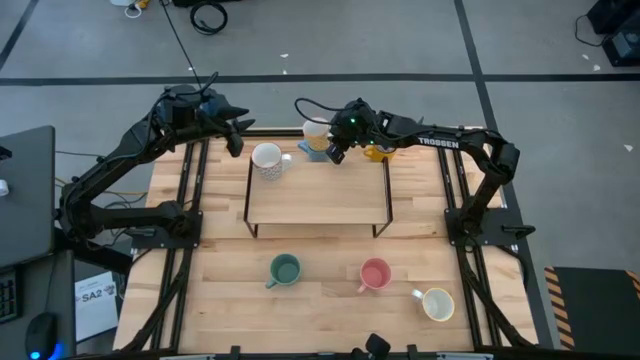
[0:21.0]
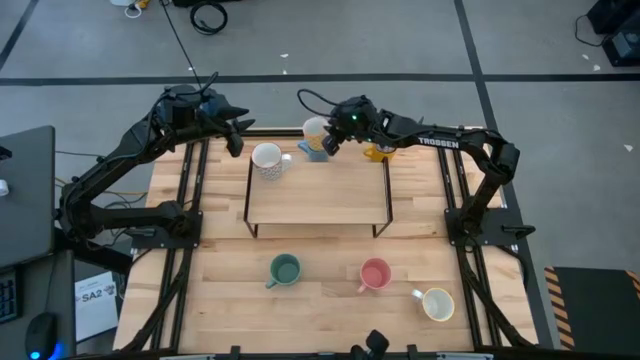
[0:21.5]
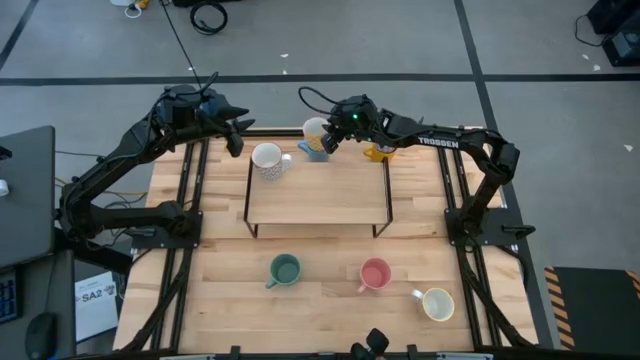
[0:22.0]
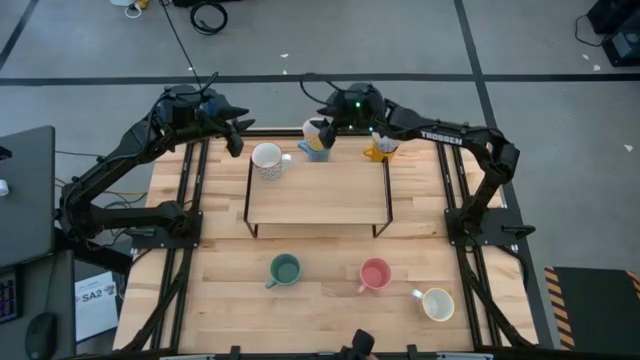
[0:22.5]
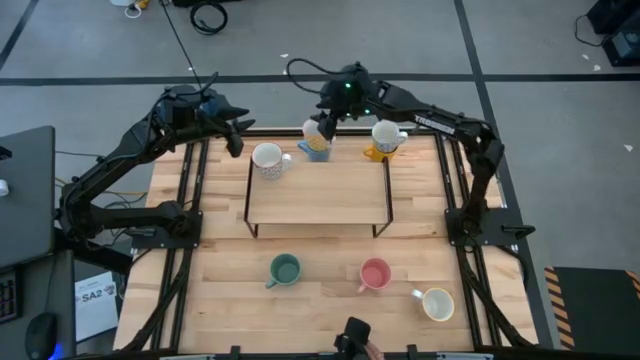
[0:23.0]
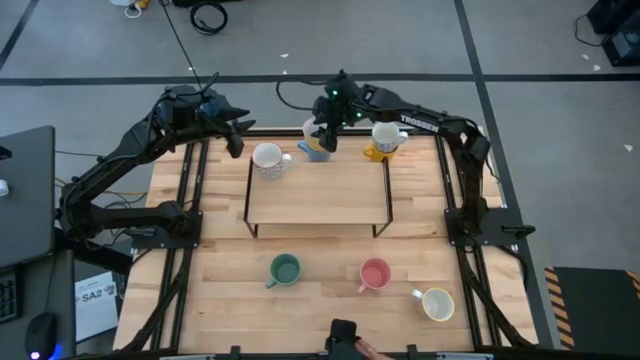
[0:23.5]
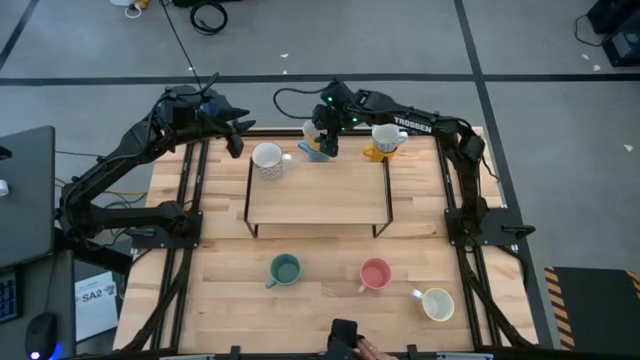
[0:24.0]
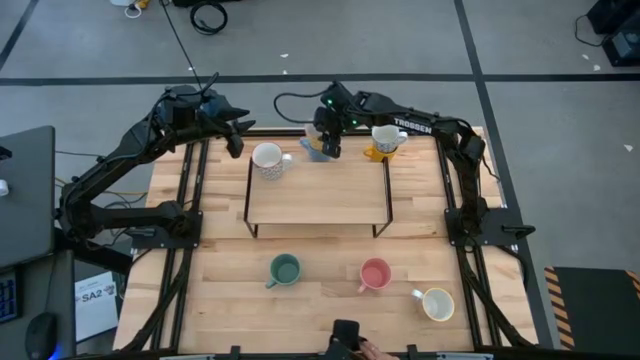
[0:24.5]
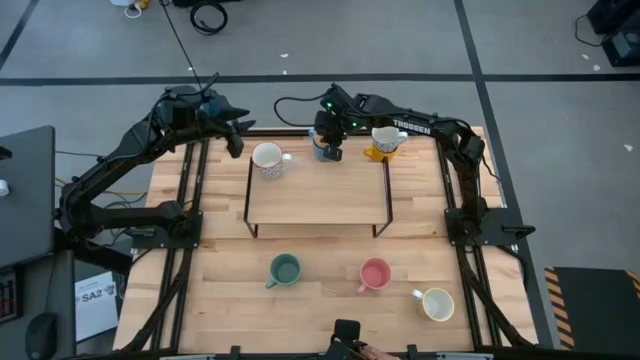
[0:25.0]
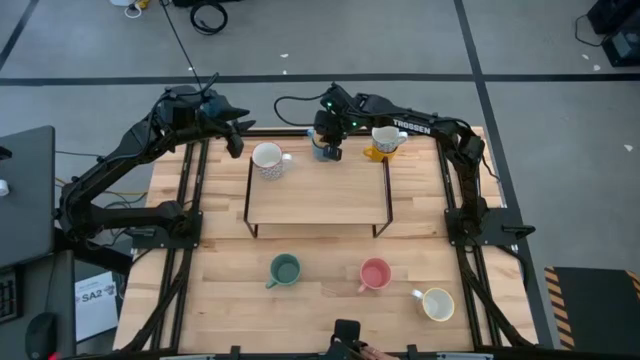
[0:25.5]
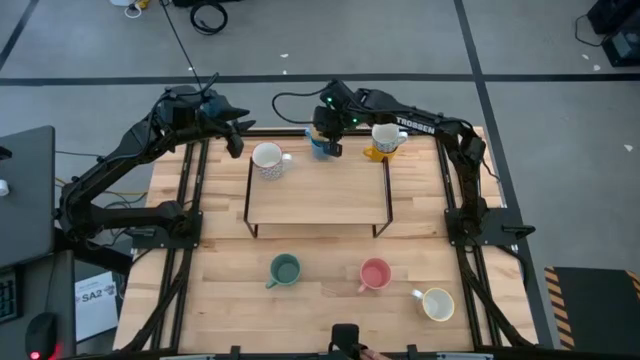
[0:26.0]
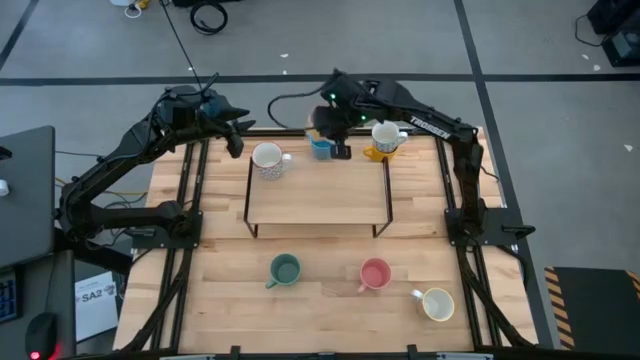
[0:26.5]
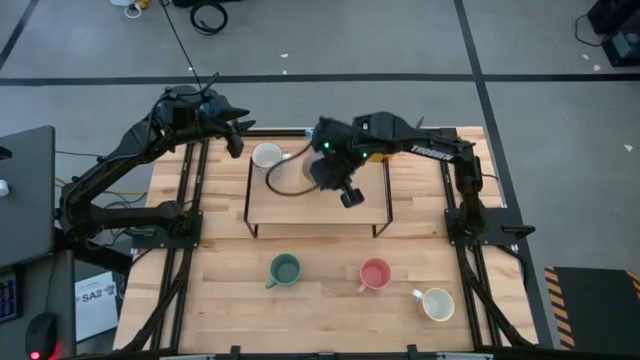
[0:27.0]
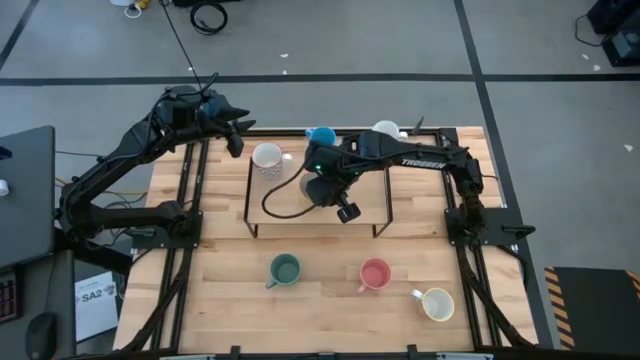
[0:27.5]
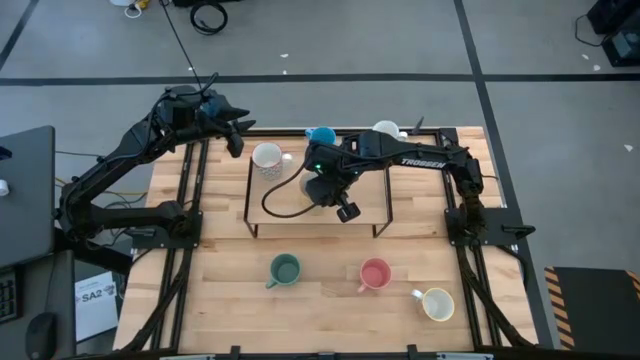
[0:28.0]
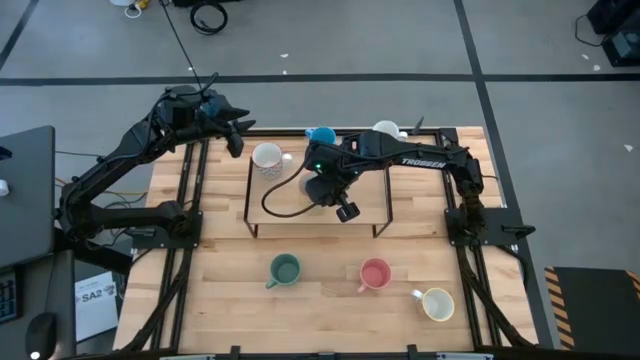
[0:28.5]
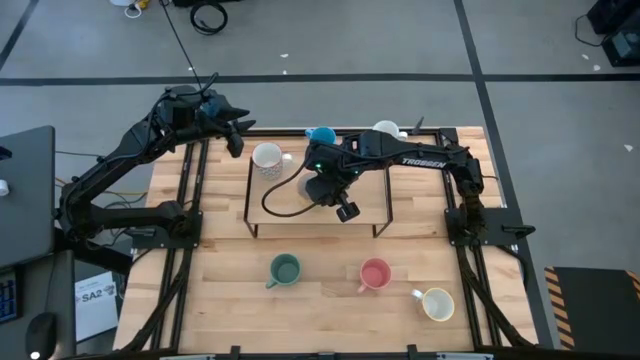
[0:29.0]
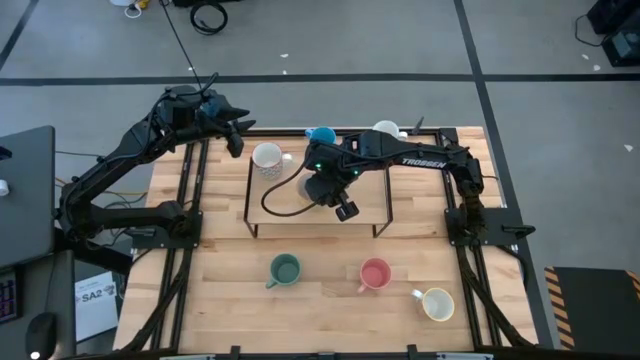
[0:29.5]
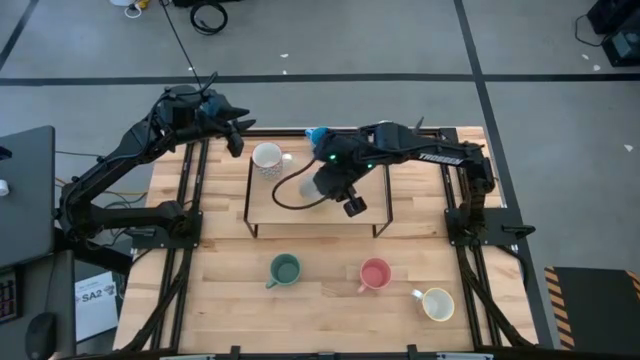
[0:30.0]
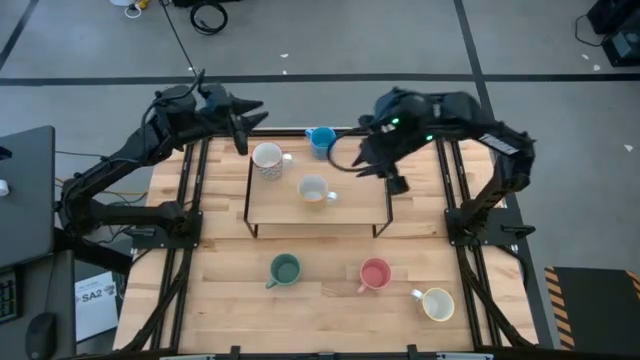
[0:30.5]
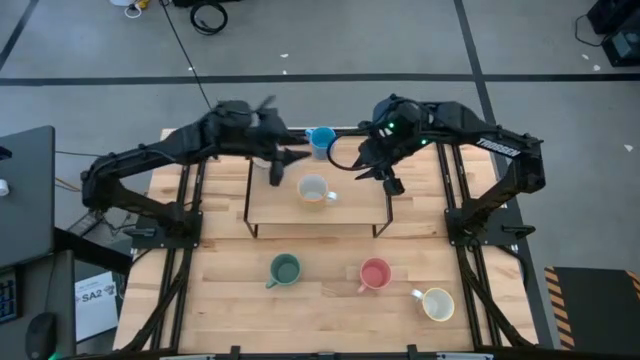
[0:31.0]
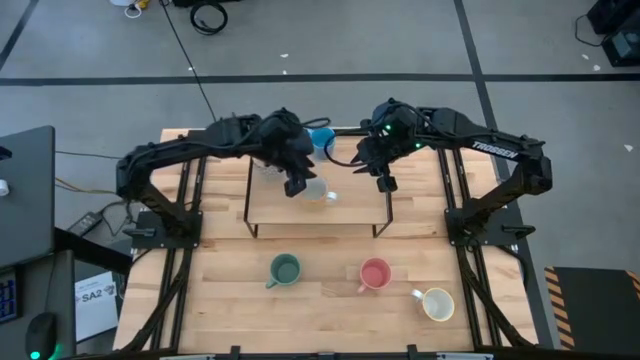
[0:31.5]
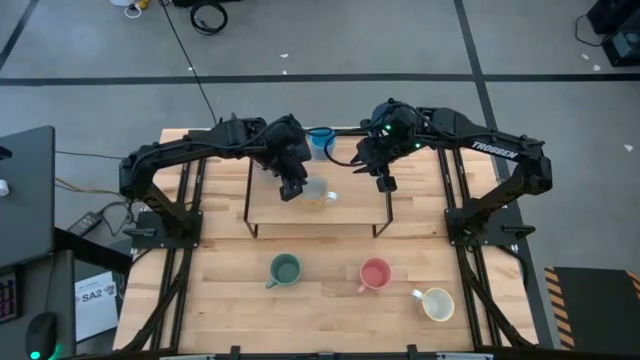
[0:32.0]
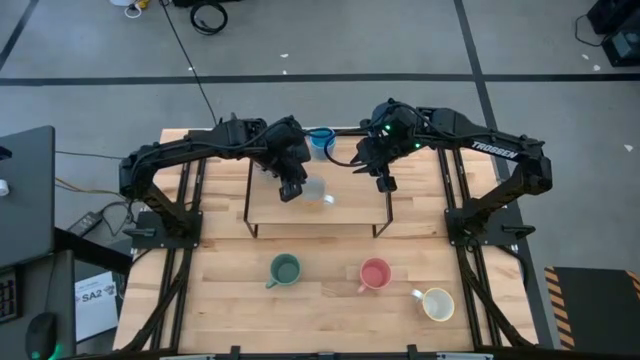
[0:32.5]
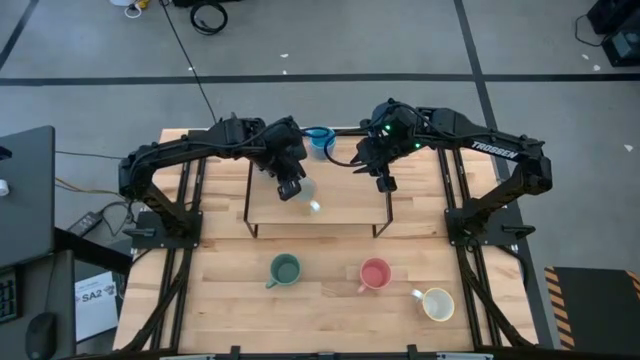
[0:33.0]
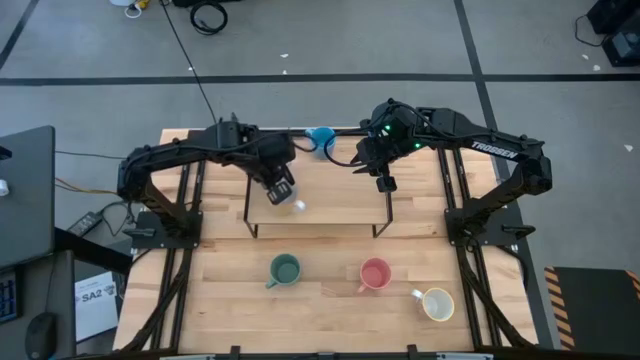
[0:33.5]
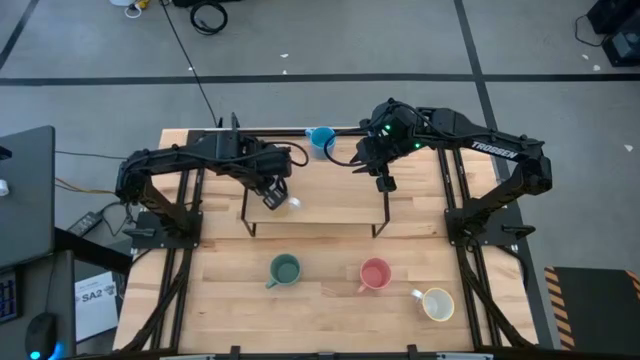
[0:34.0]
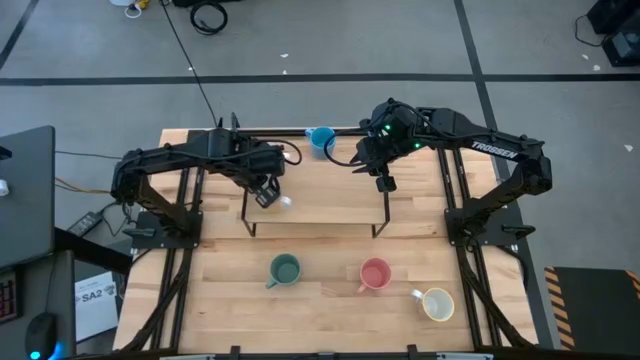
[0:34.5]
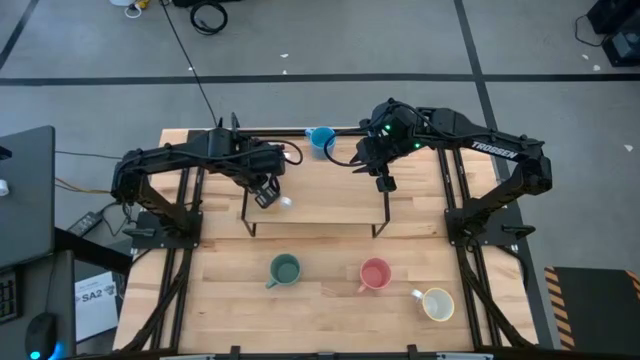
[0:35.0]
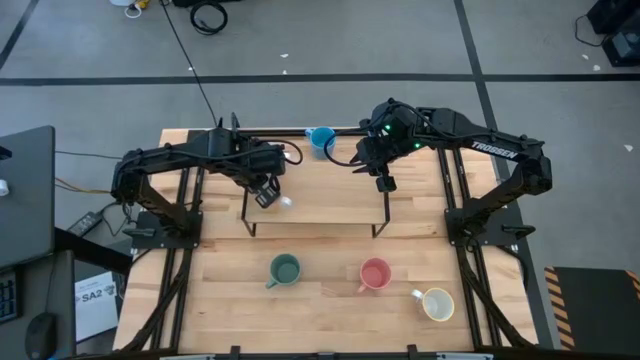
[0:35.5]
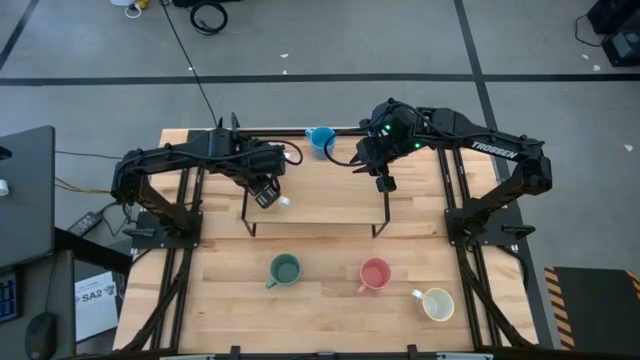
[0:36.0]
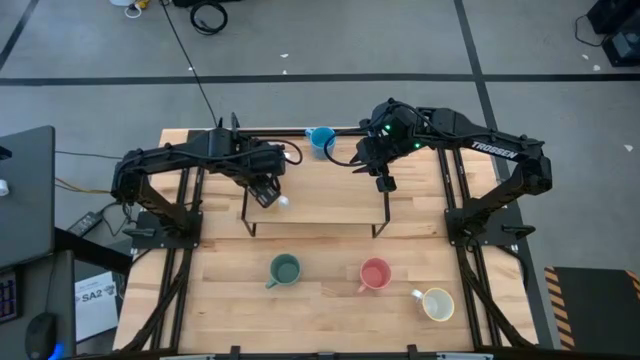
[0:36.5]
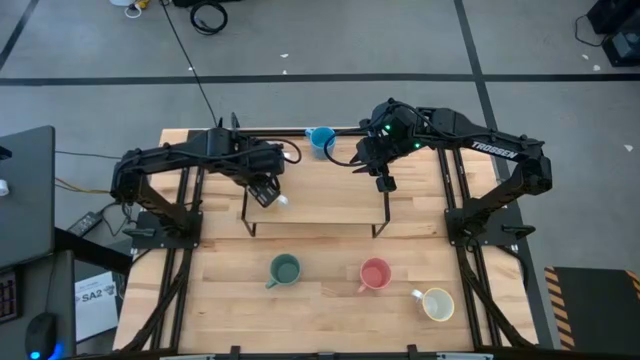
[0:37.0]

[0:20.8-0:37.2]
Task: Place coffee mugs
Put the yellow patterned mug on the shelf

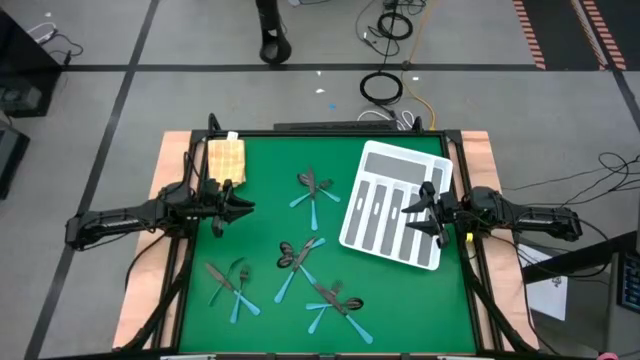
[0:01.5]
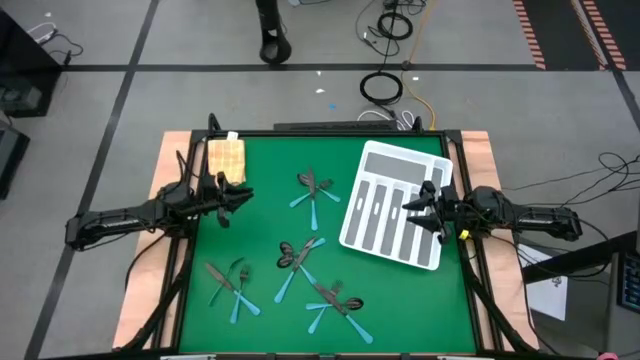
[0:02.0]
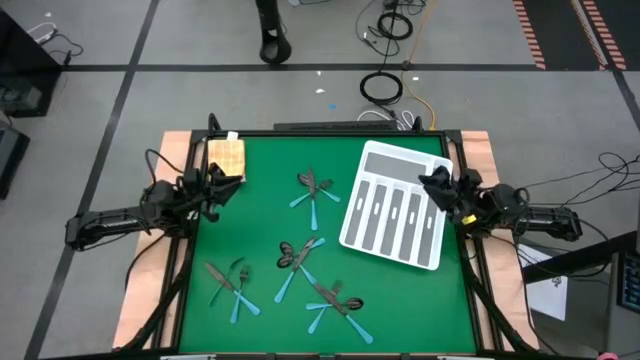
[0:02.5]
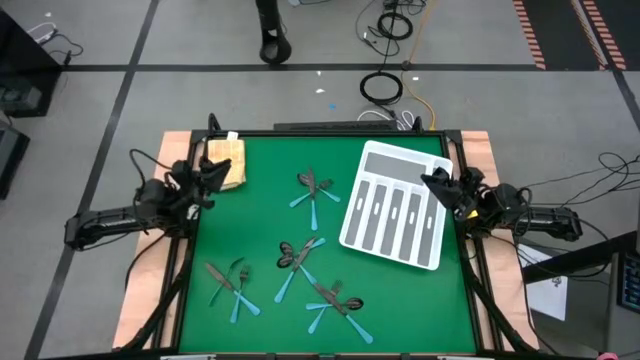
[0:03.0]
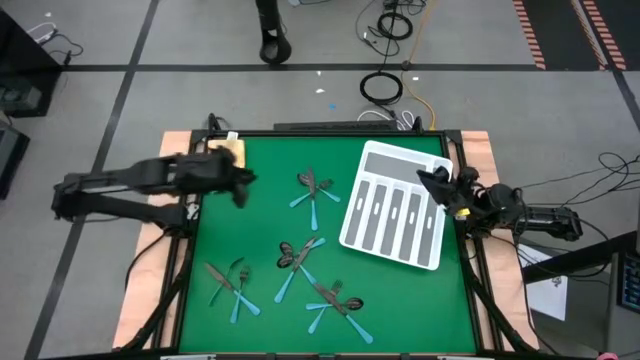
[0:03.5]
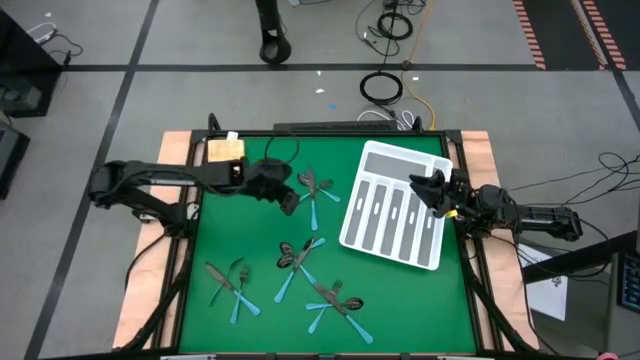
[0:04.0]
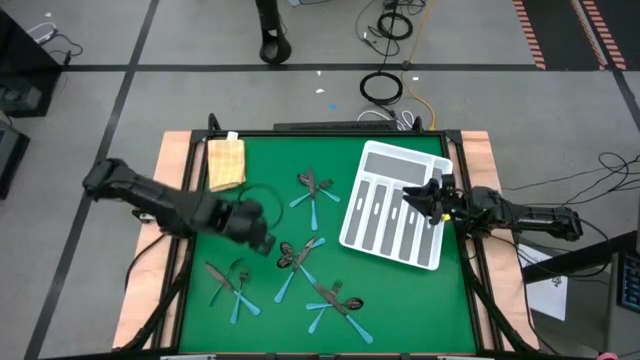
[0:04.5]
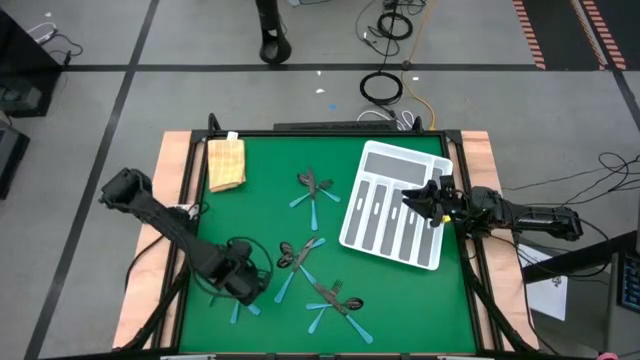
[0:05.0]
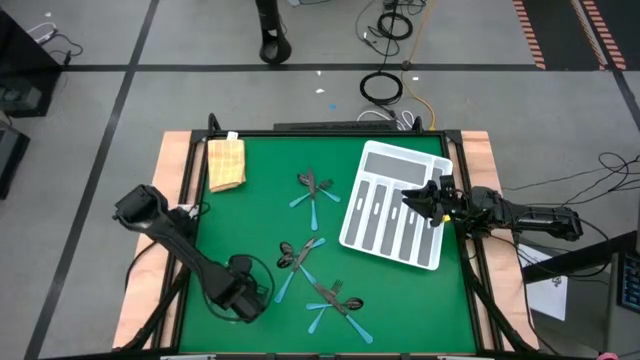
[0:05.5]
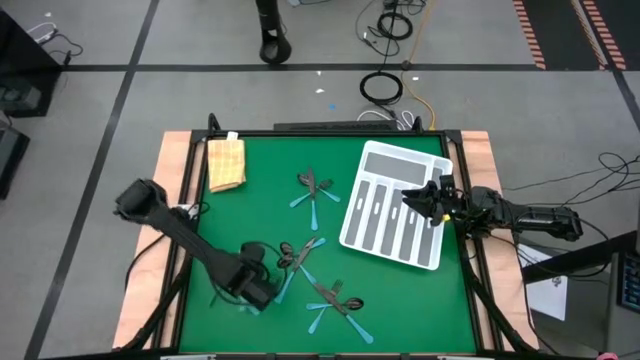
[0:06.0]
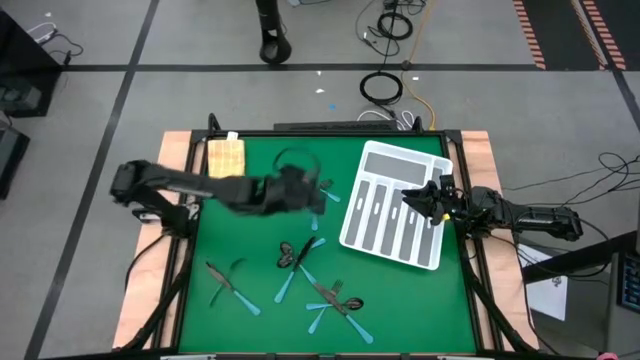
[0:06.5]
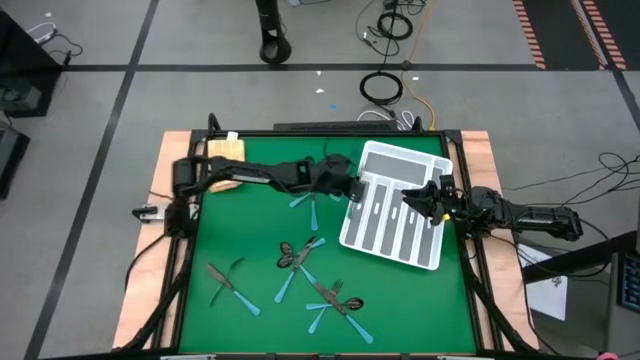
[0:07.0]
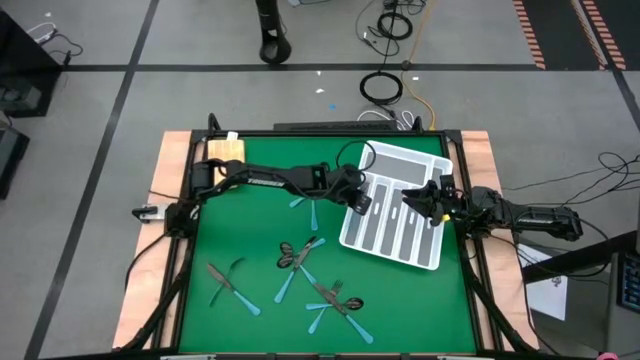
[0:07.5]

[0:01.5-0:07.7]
Task: Sort silverware
Put the blue fork into the white cutlery tray
